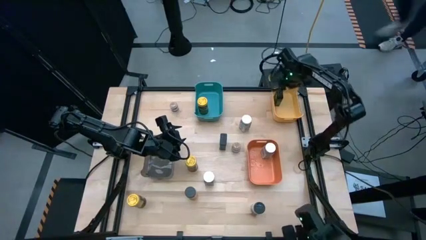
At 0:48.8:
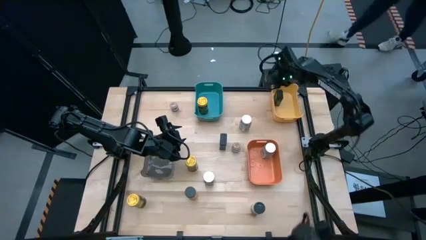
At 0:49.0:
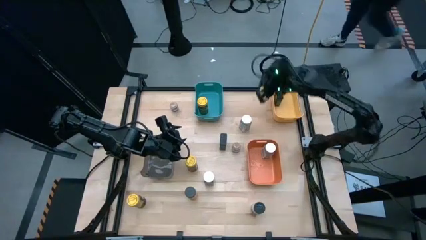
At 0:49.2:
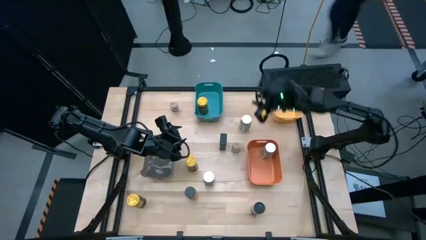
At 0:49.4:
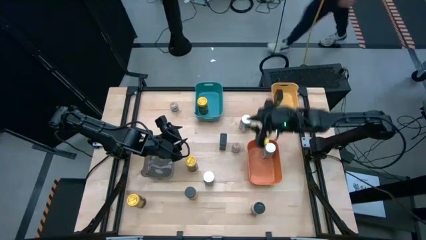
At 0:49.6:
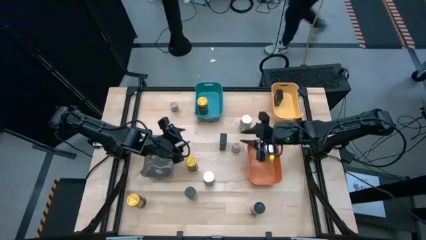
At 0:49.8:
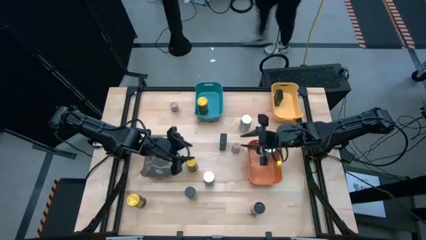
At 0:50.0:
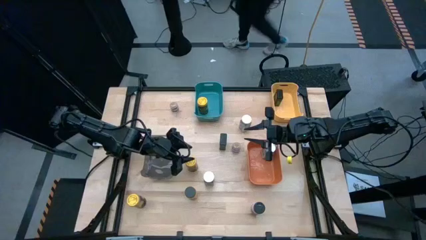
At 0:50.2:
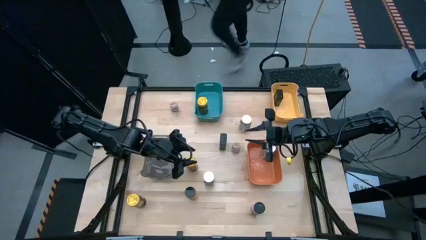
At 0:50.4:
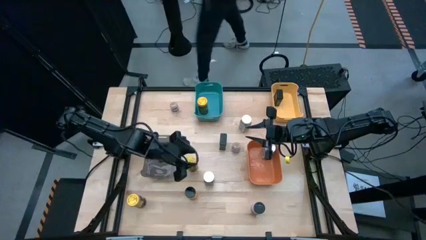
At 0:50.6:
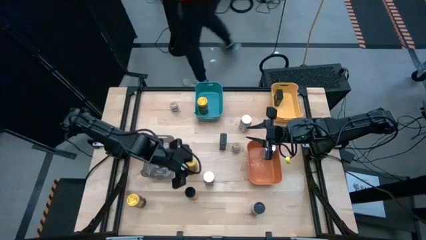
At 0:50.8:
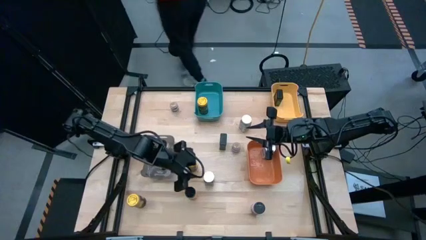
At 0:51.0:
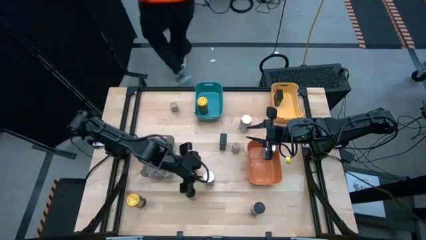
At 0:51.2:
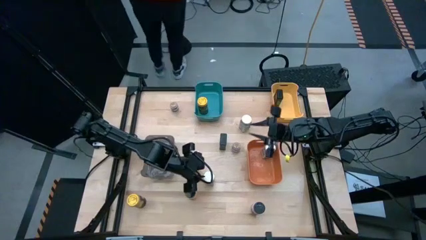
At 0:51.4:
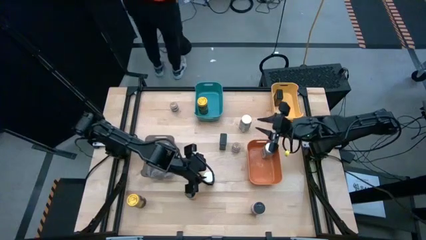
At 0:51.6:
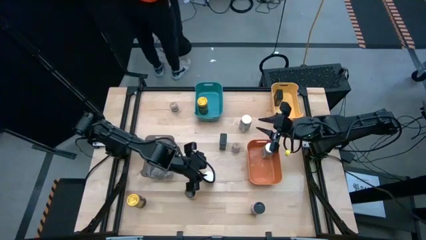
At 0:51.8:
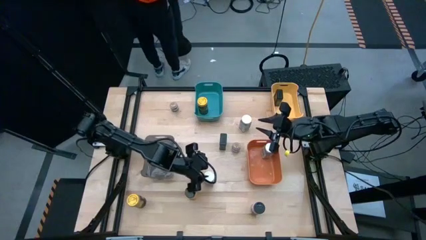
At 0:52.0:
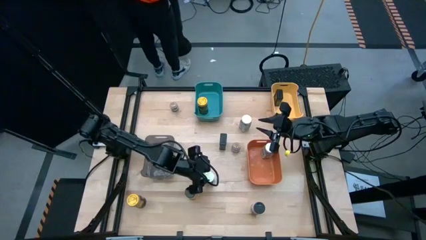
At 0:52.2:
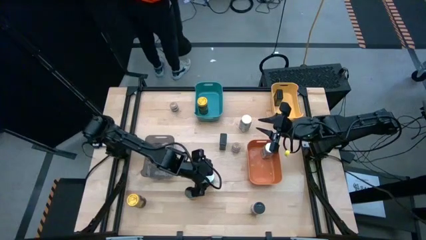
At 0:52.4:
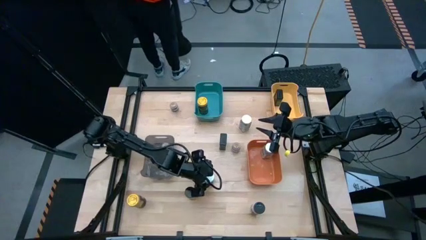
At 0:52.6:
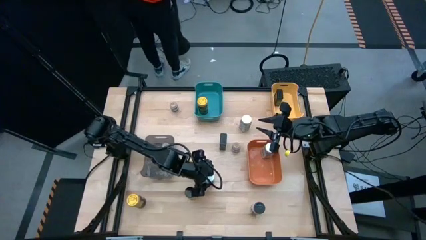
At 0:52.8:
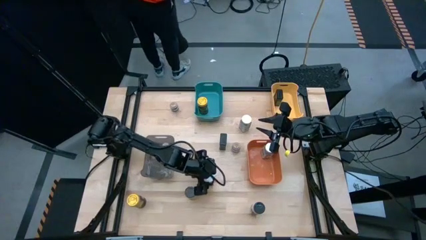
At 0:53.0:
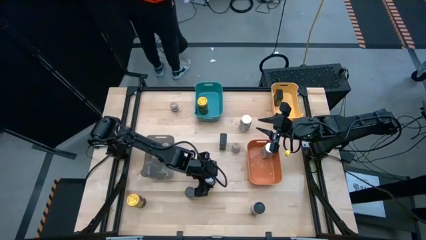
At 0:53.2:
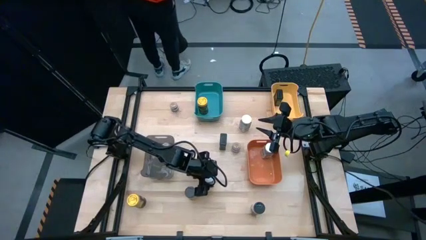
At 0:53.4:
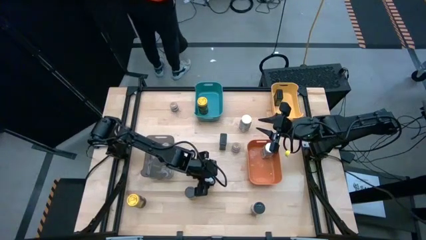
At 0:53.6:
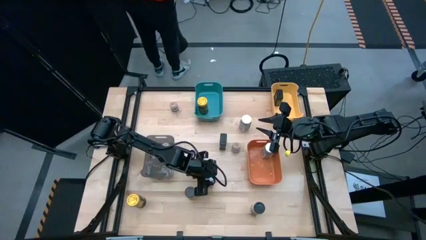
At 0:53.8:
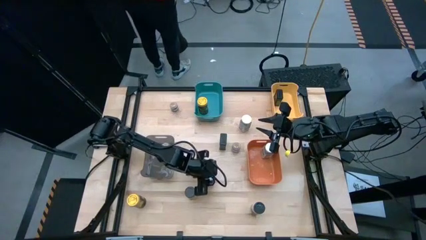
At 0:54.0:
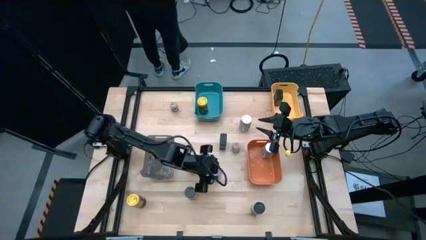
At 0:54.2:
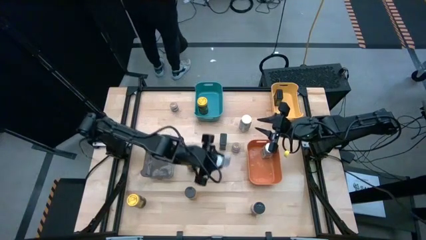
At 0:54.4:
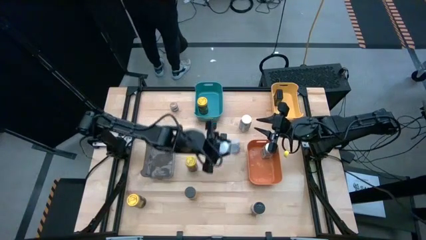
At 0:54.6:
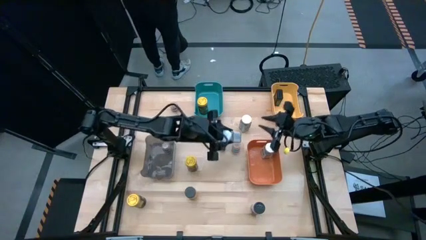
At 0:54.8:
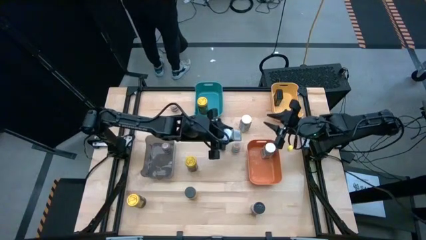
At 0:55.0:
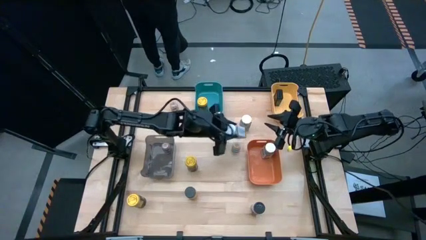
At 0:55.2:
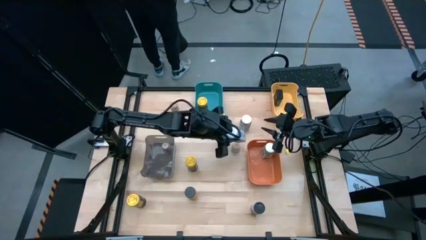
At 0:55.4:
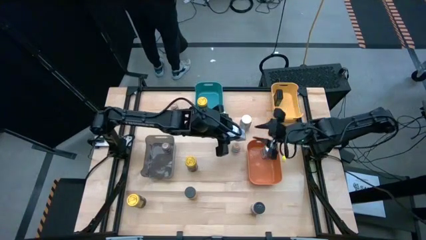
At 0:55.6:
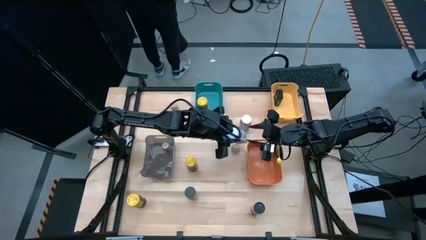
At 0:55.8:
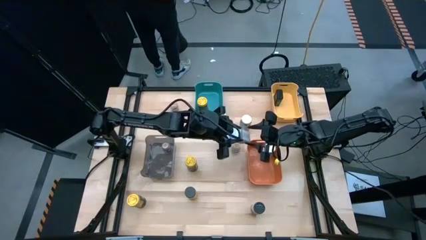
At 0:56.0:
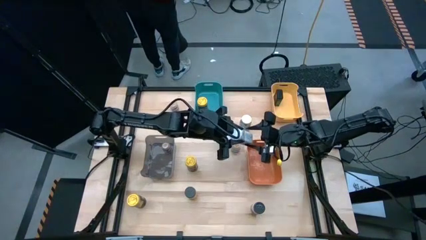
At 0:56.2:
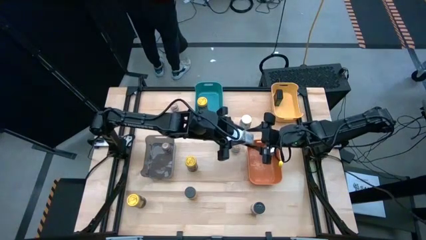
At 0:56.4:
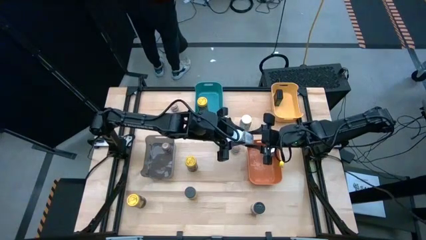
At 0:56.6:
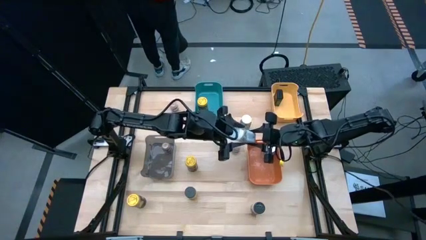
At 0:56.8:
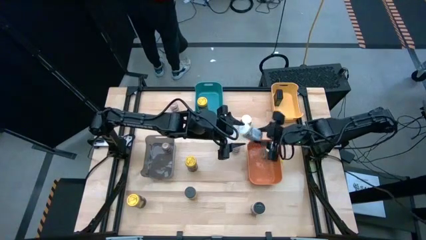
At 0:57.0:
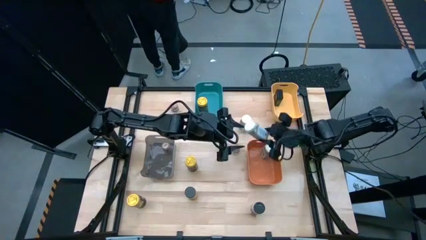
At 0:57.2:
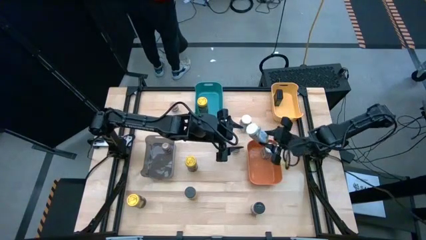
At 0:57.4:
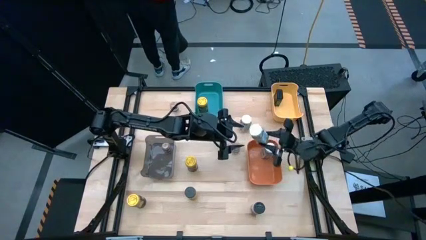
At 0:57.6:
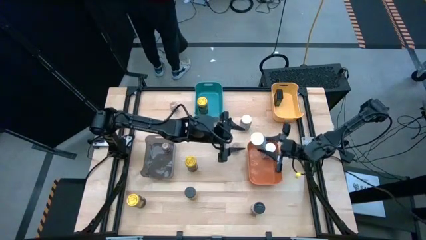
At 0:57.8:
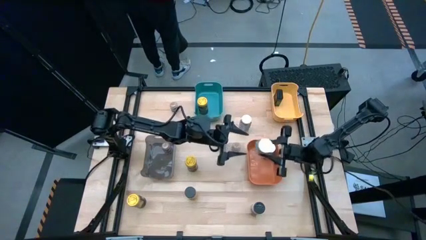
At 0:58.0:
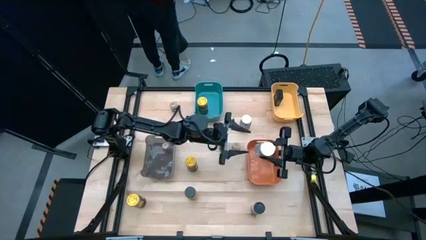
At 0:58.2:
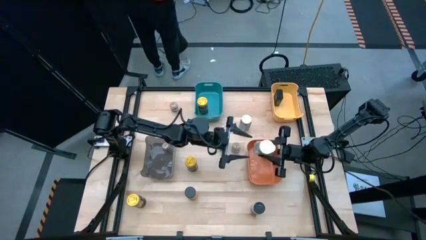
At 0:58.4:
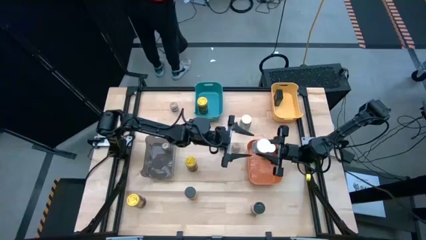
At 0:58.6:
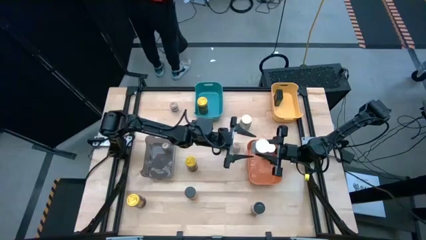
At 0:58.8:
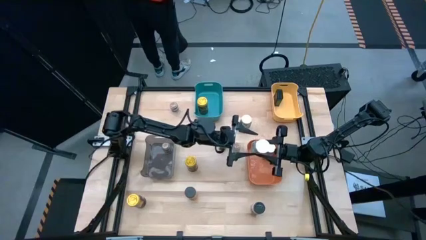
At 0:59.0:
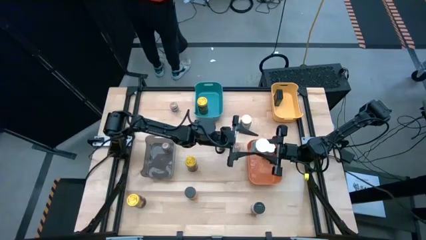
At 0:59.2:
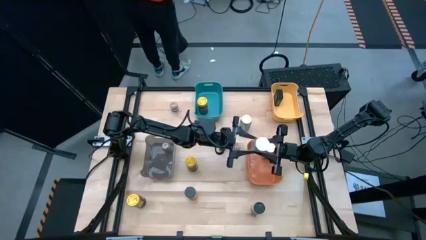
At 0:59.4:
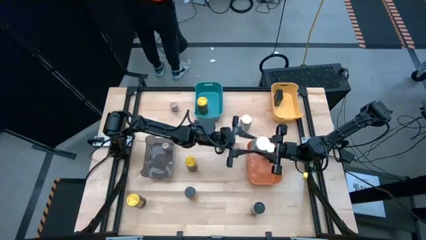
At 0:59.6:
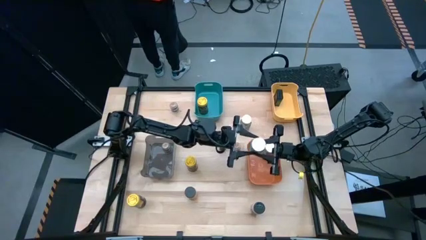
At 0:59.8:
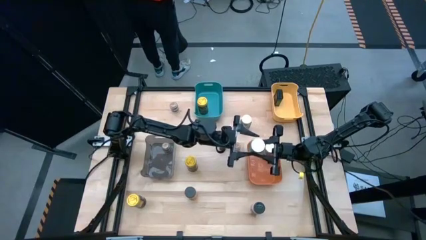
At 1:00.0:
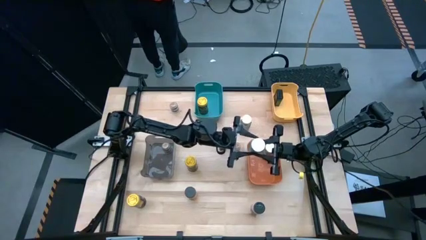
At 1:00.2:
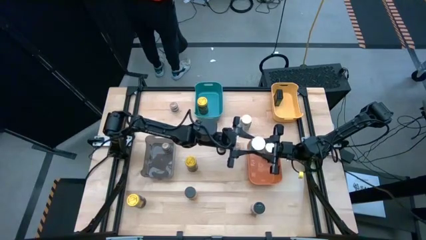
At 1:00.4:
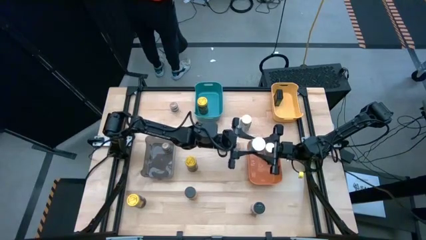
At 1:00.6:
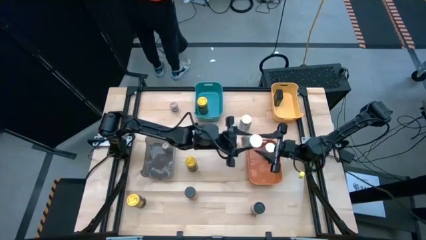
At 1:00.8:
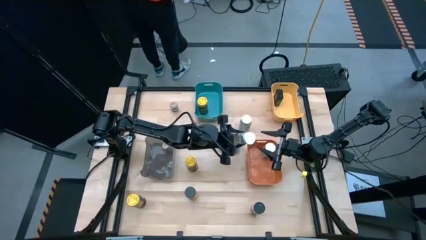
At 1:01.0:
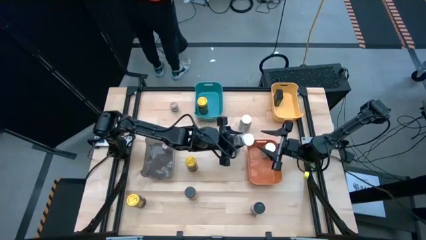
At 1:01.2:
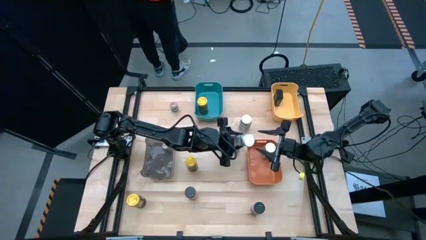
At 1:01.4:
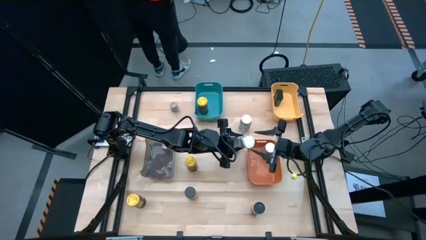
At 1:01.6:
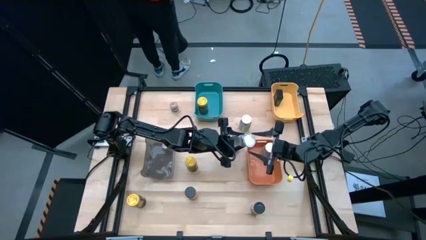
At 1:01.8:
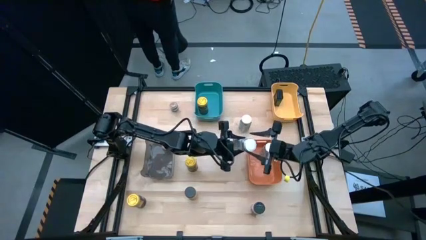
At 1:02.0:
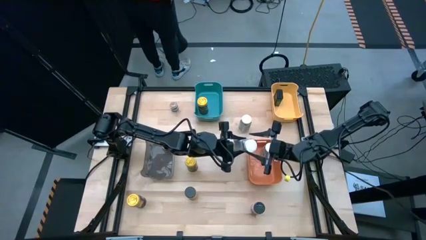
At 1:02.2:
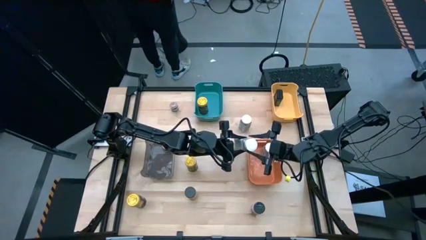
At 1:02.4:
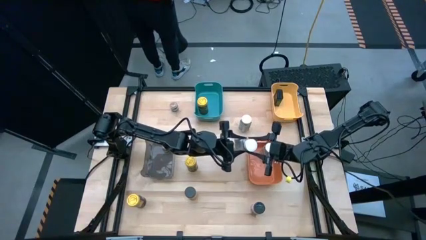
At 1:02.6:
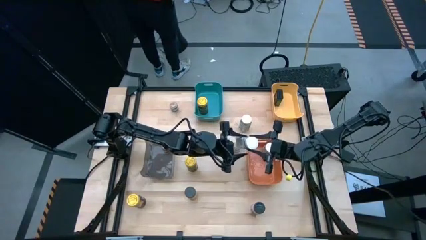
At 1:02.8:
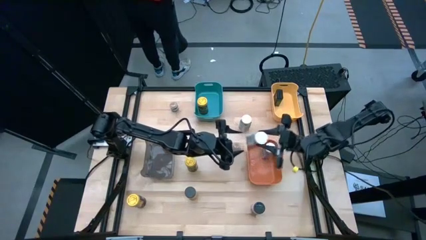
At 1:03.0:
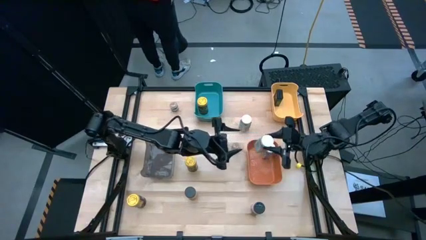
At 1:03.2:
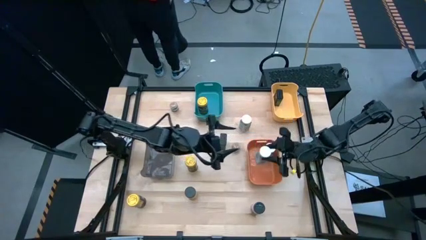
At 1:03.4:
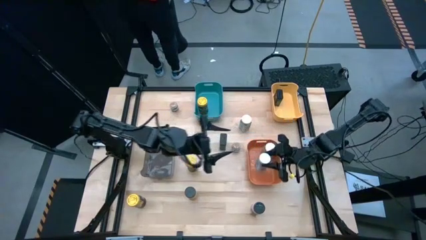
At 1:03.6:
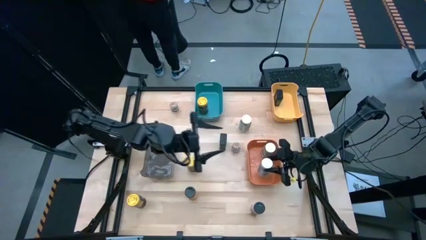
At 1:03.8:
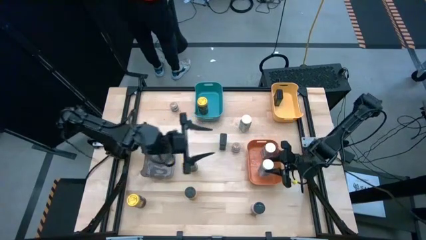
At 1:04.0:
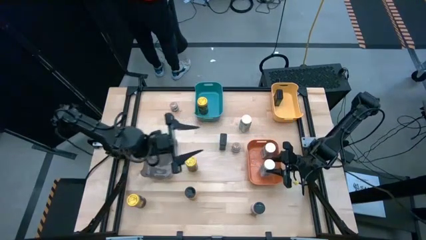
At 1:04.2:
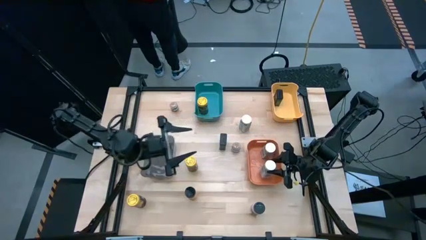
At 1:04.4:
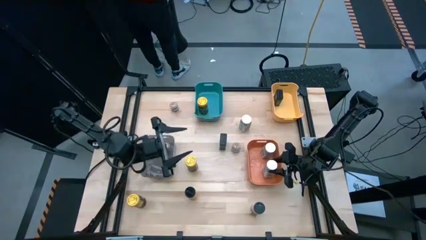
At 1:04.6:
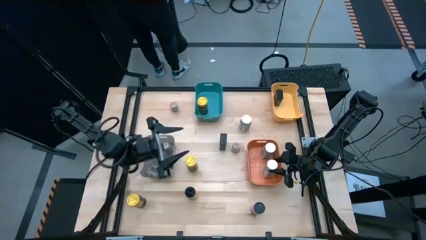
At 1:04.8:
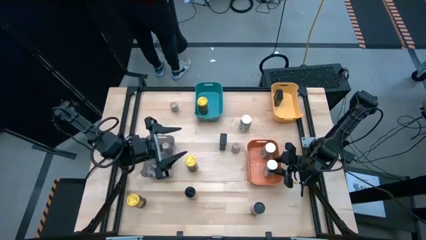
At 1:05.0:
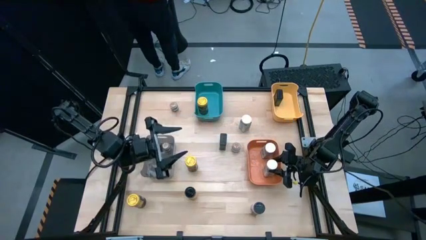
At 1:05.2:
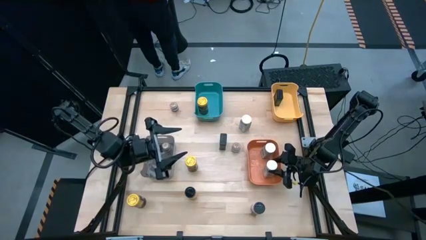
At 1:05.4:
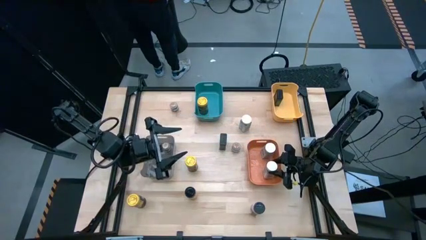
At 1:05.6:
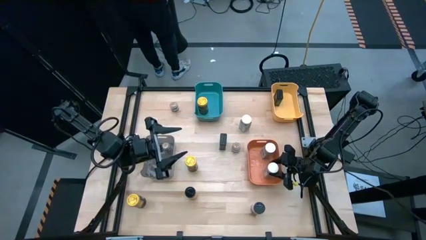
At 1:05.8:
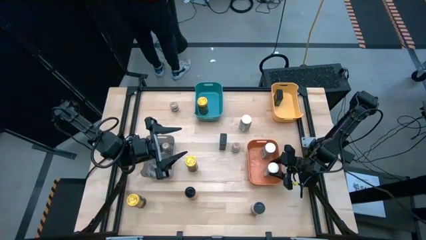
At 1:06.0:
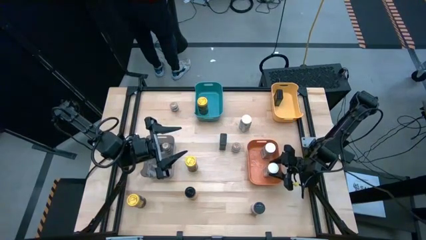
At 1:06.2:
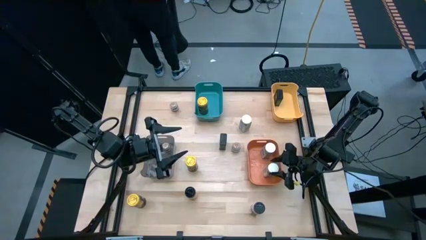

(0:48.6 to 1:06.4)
Task: Sort spices by type
Put the bottom white seasoning bottle into the orange bin
